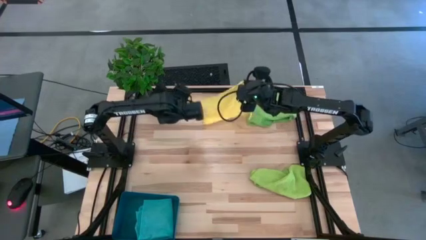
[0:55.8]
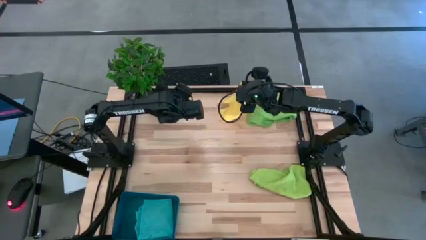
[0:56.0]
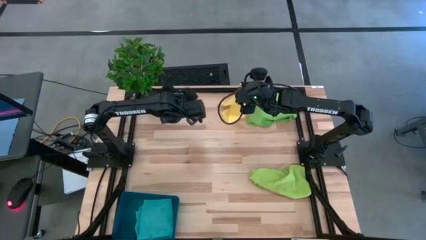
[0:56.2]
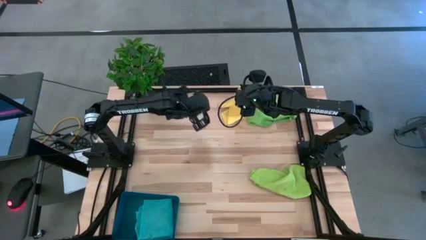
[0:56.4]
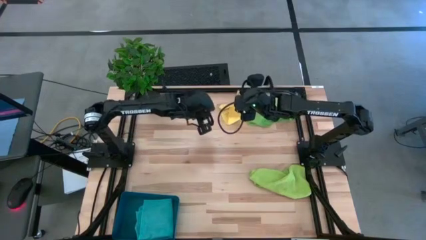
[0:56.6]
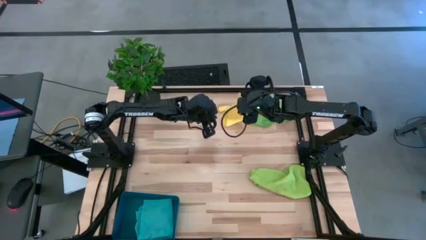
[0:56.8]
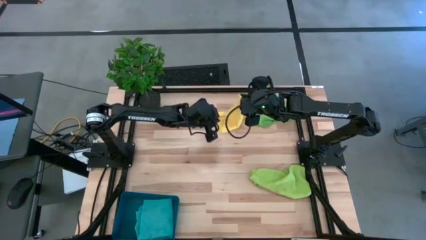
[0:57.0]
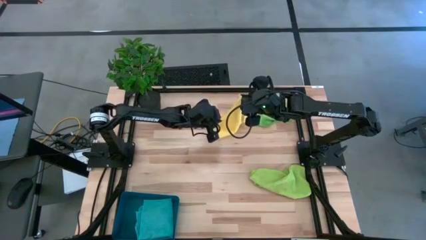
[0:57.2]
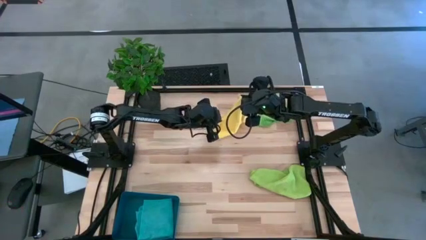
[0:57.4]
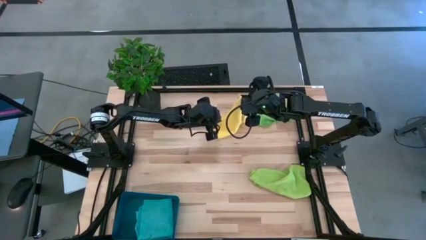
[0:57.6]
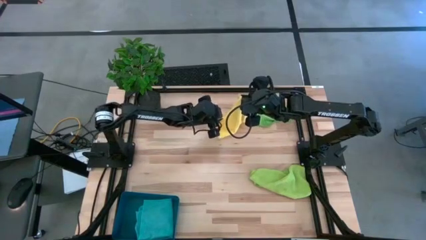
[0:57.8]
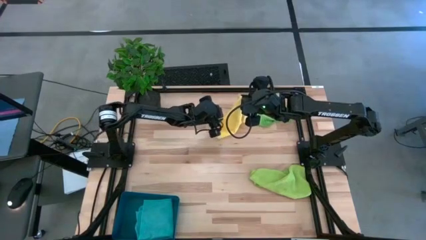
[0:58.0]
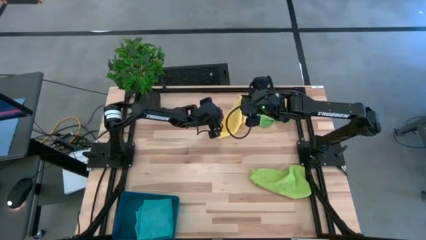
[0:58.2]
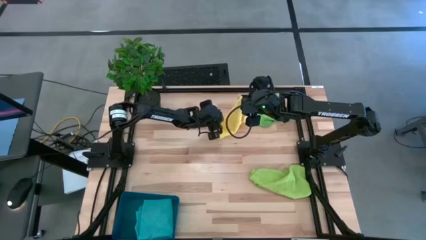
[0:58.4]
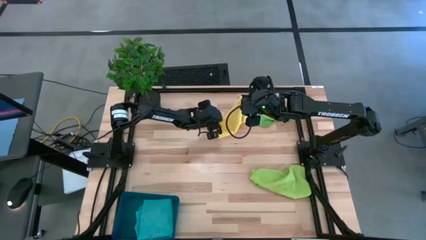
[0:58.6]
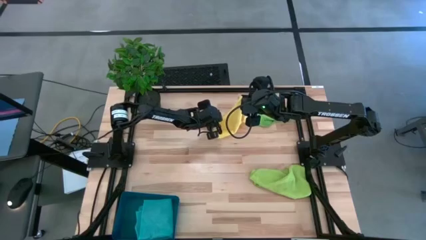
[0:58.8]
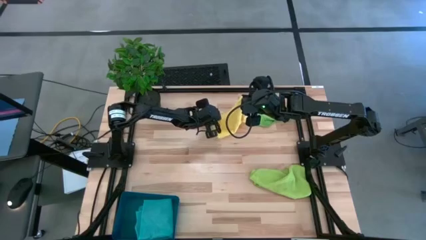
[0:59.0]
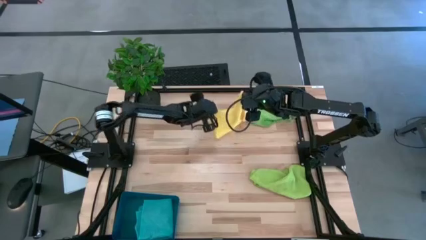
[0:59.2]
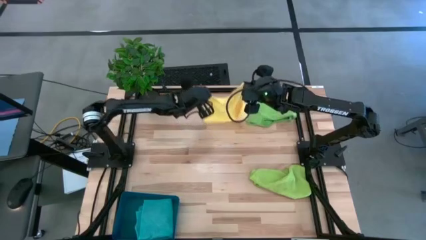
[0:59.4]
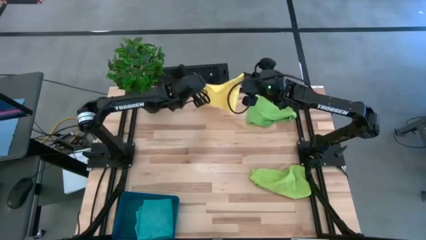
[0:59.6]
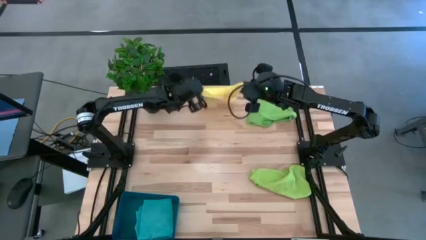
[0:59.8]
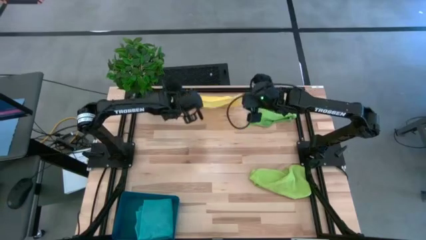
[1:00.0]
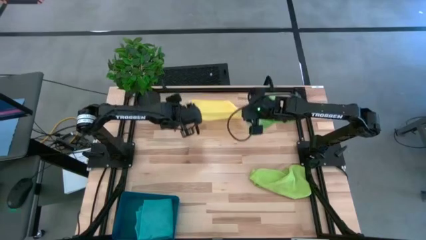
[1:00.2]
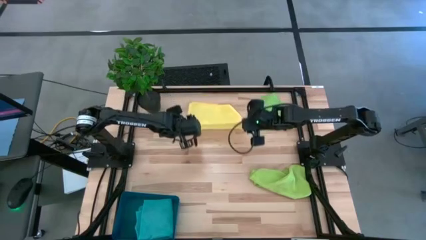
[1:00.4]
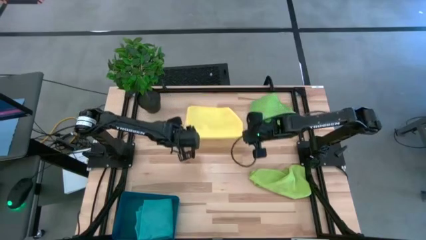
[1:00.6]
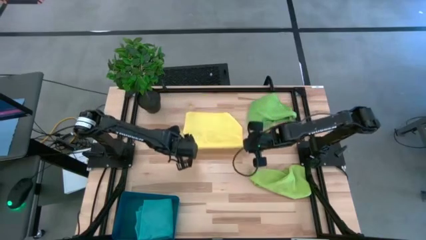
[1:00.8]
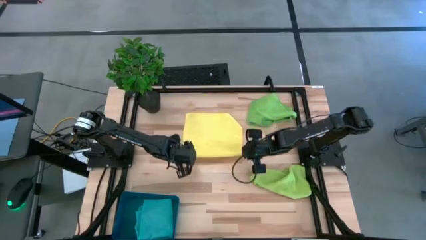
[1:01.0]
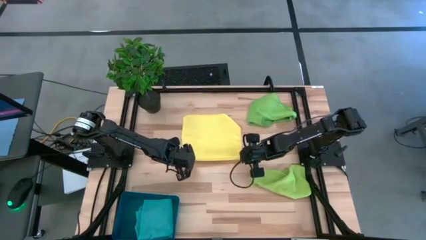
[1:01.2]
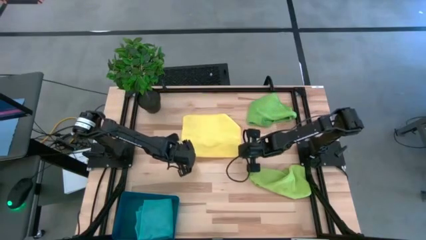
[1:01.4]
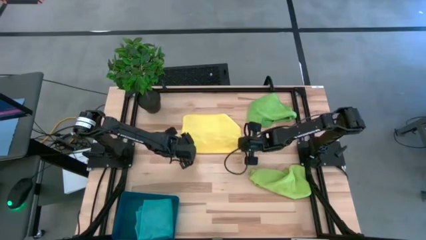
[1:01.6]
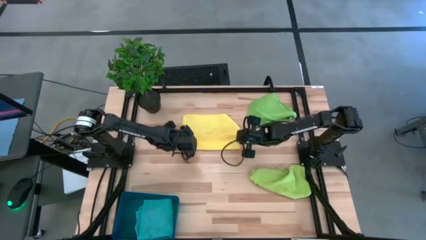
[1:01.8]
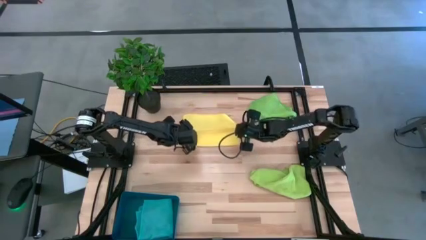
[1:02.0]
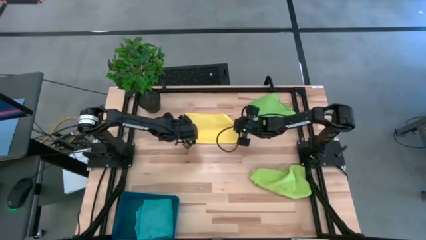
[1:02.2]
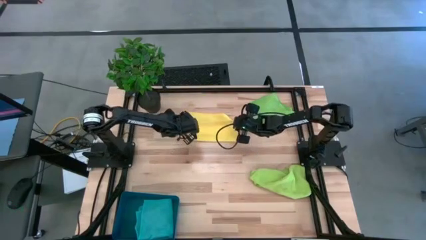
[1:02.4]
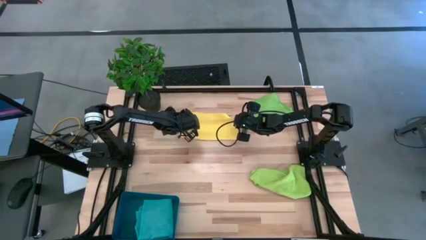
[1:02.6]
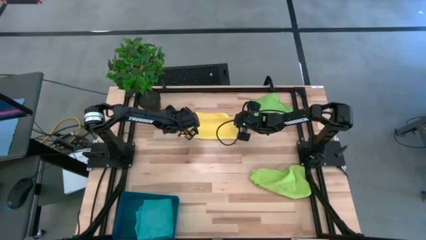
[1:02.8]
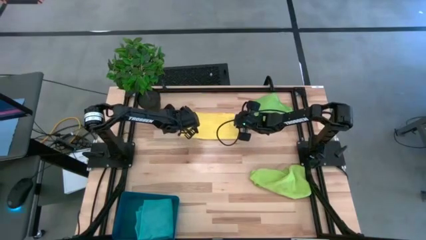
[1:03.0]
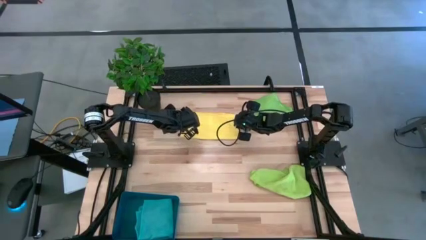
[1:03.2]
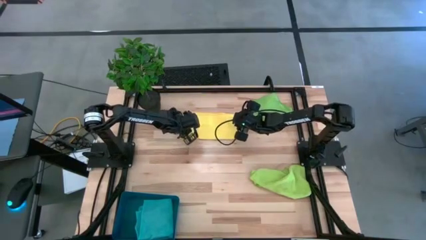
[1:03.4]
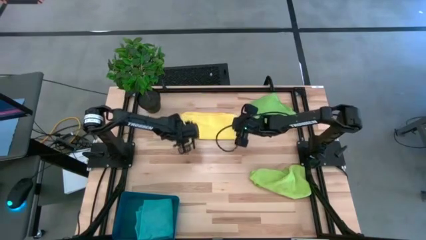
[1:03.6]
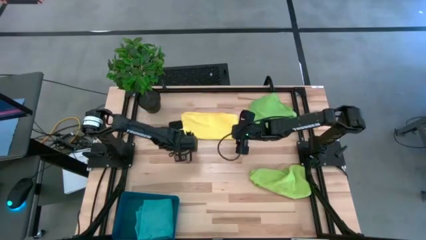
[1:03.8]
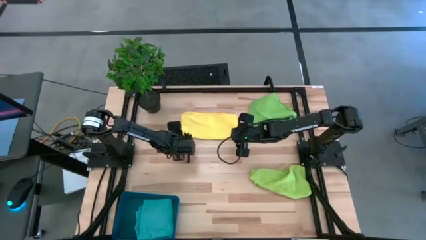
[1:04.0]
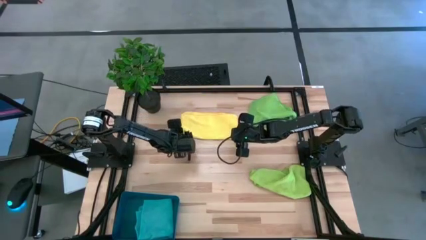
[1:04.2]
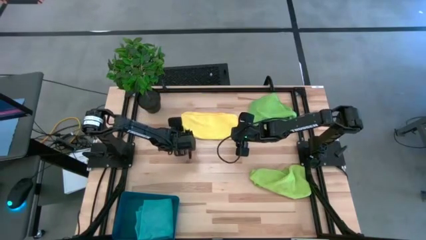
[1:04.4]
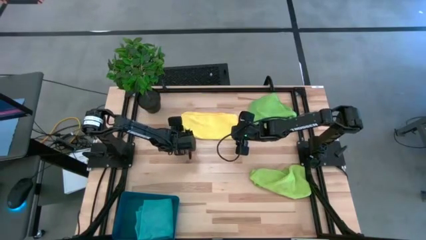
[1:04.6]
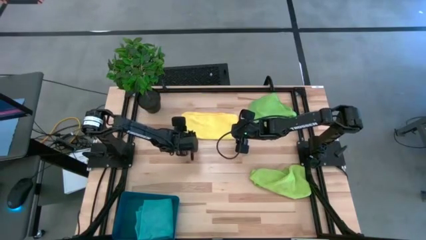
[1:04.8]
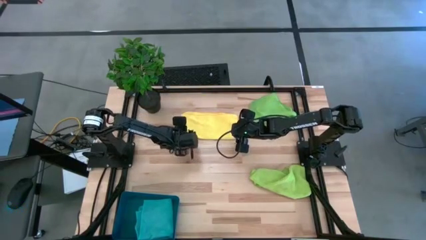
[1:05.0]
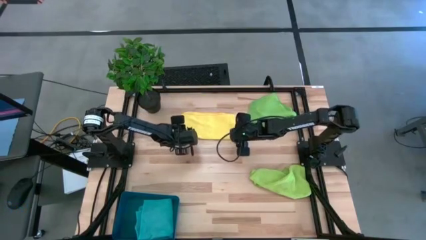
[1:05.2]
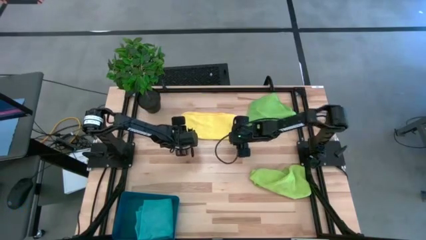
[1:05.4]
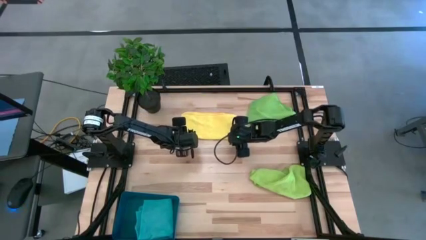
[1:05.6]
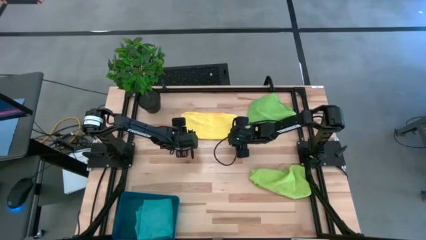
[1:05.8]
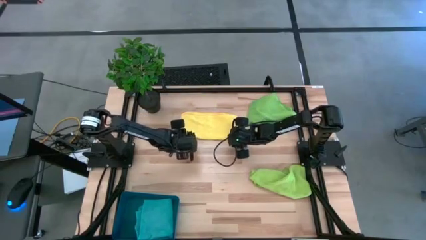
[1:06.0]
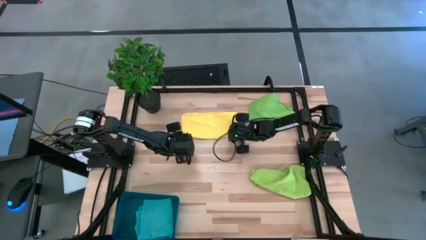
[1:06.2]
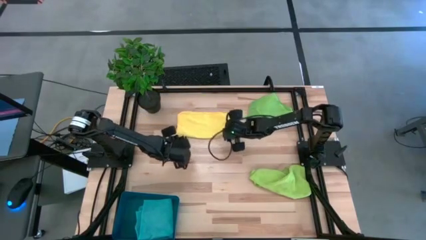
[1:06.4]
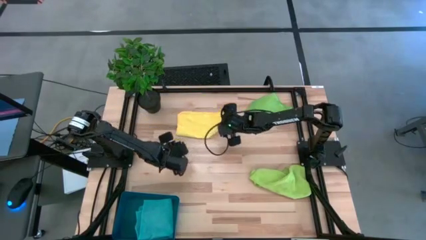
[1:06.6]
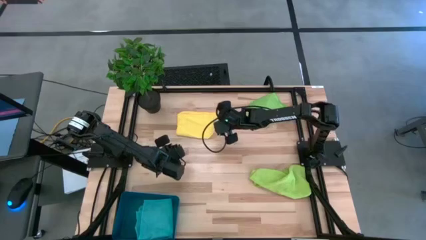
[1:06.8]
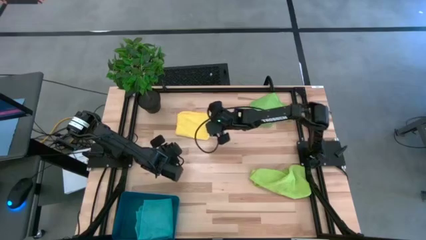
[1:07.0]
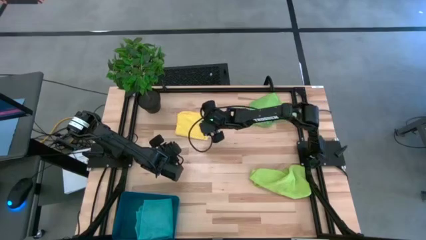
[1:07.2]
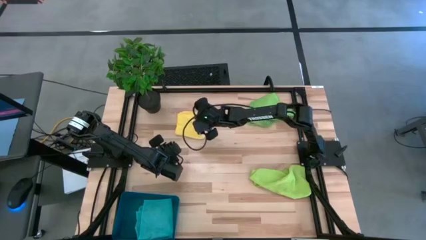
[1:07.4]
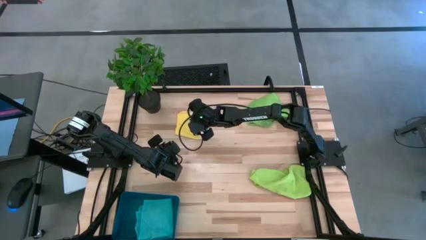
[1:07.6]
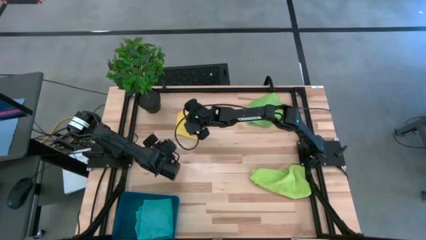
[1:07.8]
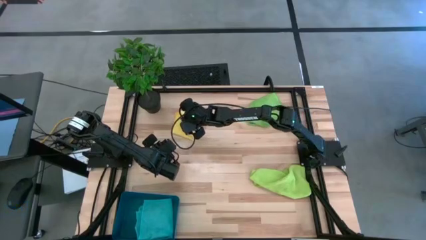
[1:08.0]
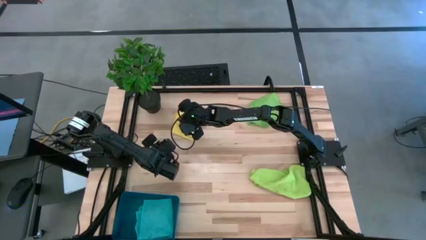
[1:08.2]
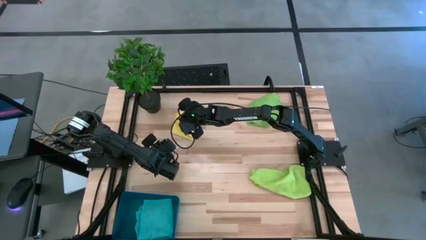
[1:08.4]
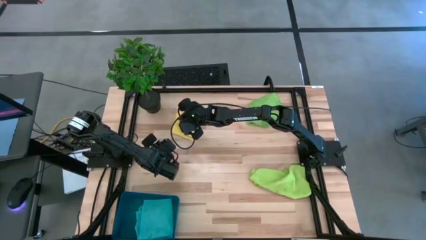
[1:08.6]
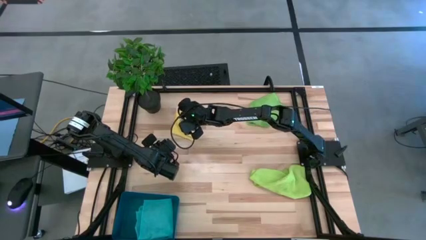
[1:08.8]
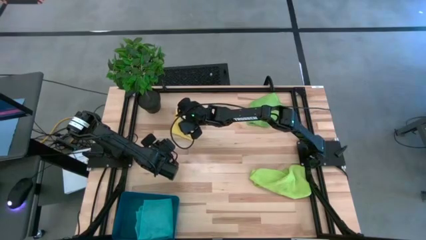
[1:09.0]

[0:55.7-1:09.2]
Task: Fold microfiber towels
Fold the yellow microfiber towel

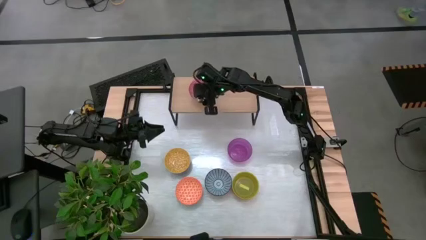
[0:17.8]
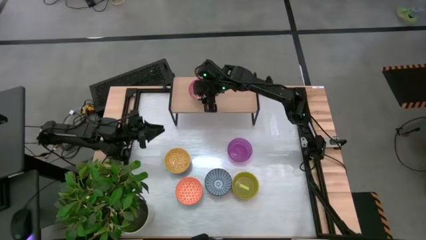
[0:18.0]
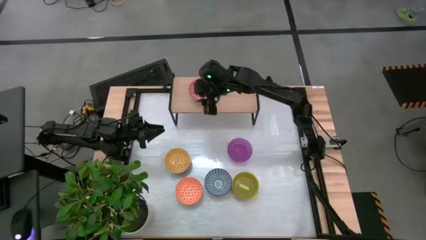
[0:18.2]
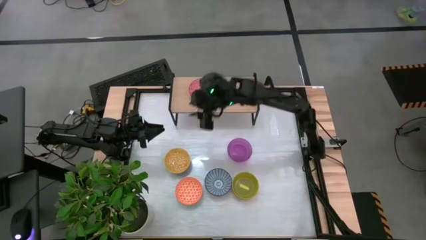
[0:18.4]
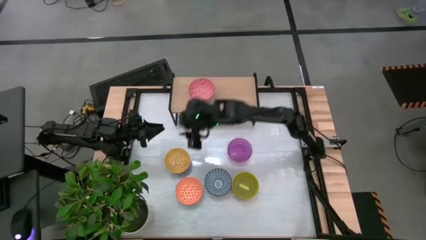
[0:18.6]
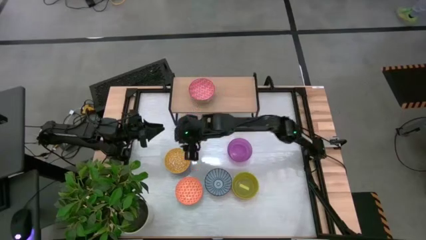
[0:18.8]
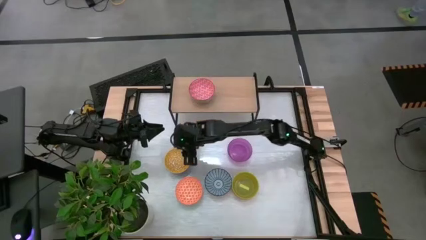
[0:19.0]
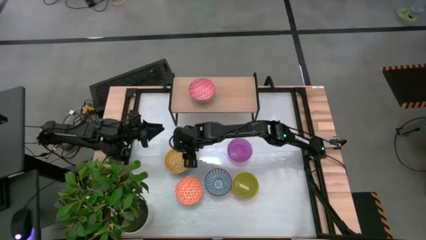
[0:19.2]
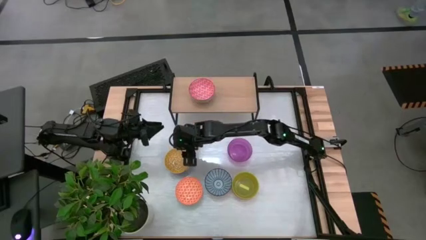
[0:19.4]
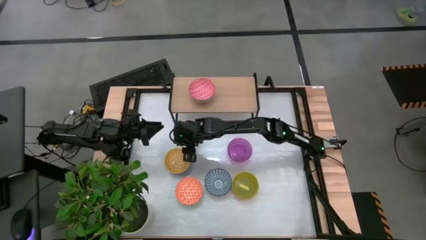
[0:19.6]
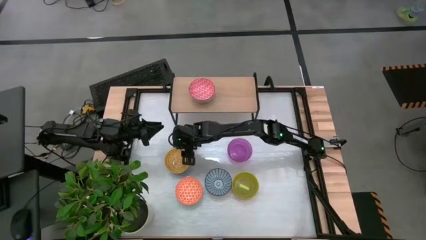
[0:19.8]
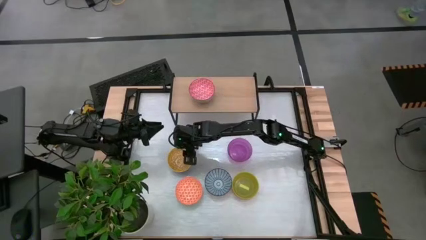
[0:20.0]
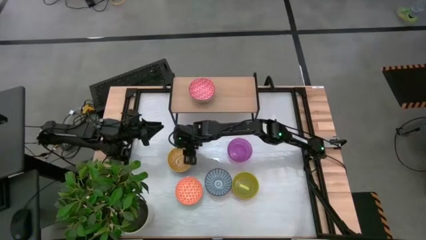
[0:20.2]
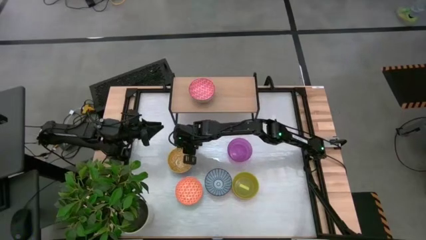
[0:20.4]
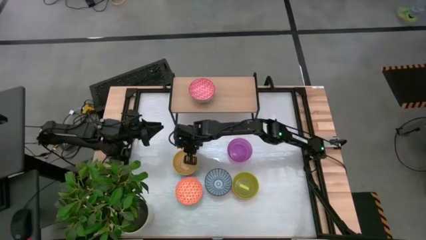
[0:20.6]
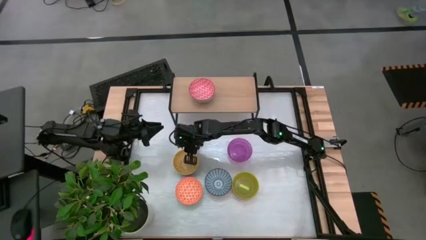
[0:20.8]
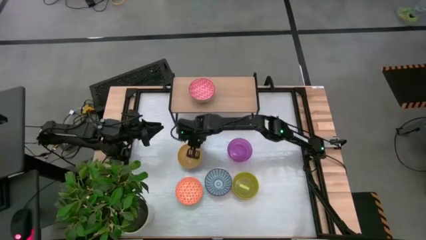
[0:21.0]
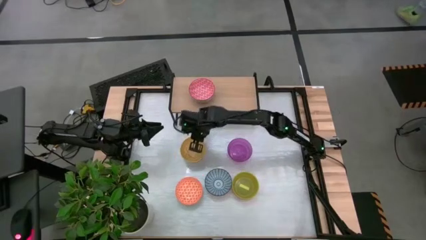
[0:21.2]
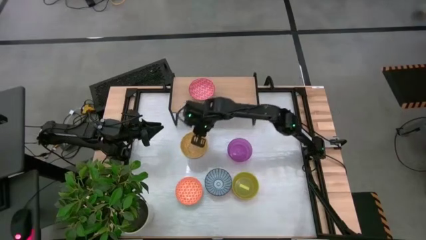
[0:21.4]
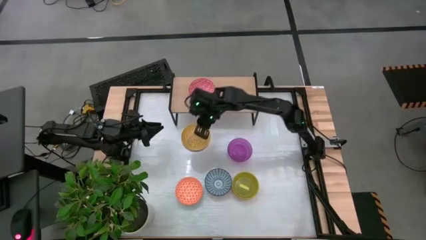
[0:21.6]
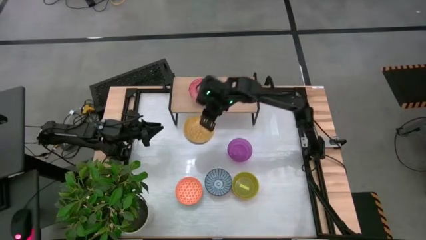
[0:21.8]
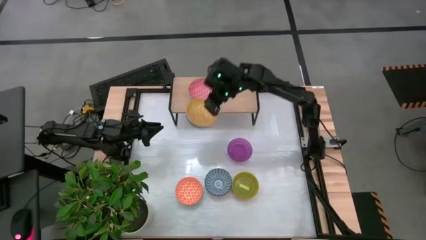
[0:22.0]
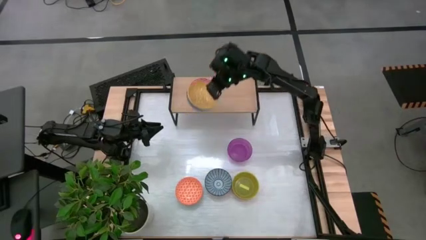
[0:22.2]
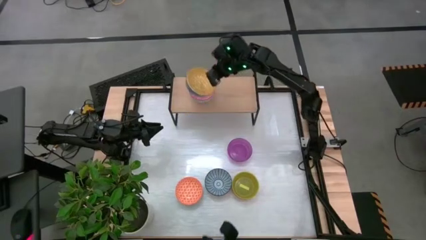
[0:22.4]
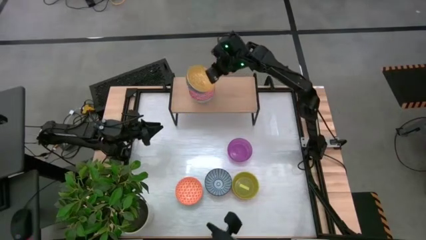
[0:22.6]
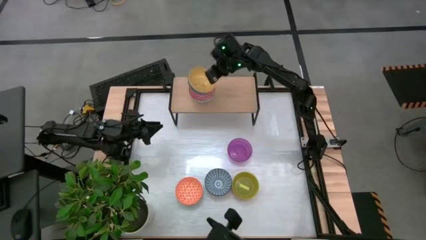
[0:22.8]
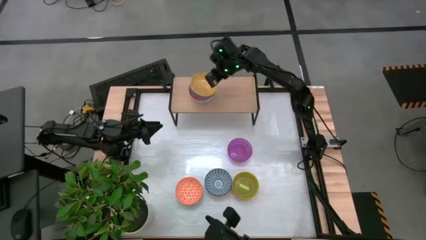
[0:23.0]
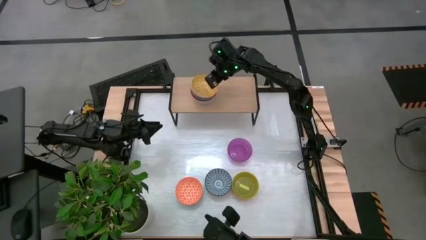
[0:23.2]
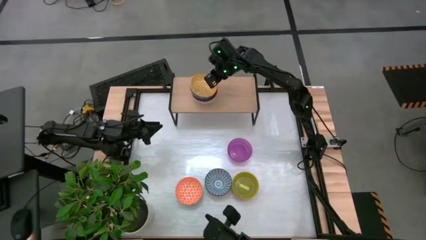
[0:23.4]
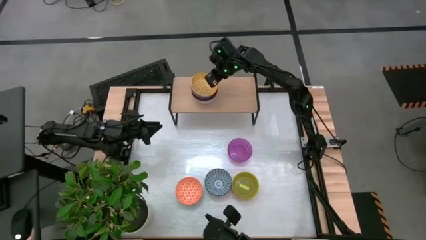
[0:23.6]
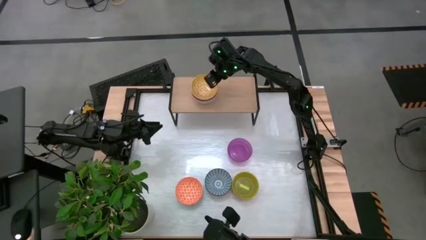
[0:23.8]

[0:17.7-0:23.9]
Task: Place and stack bowls onto a shelf
Stack the yellow patterned bowl on top of the red patterned bowl
